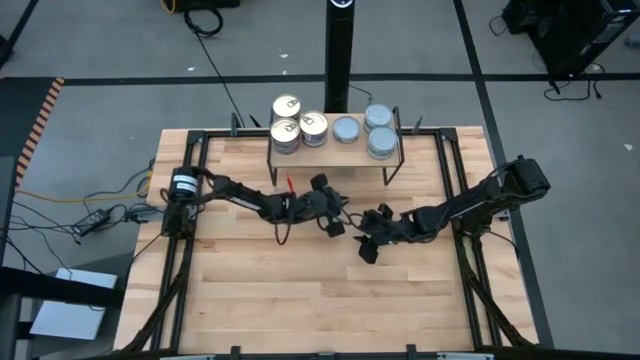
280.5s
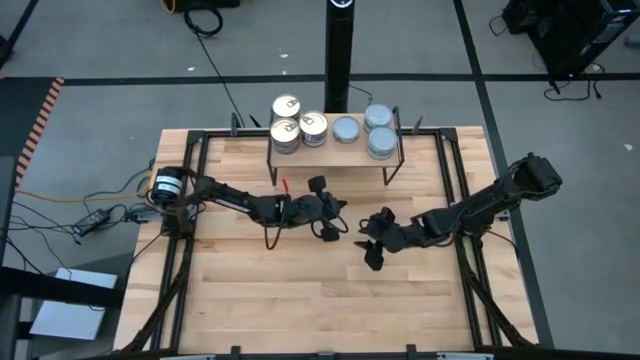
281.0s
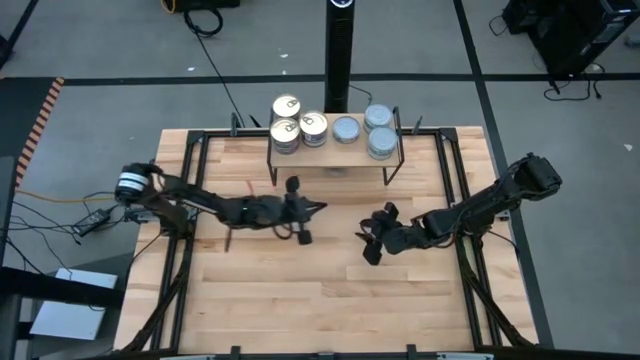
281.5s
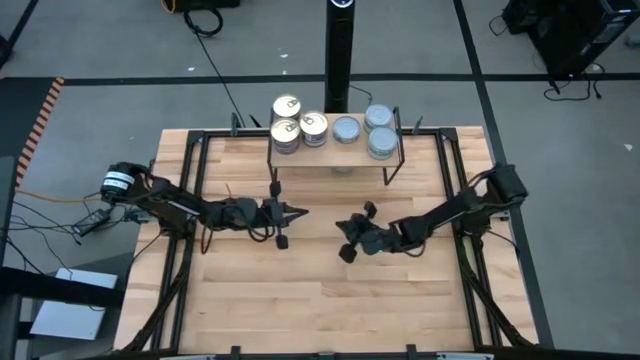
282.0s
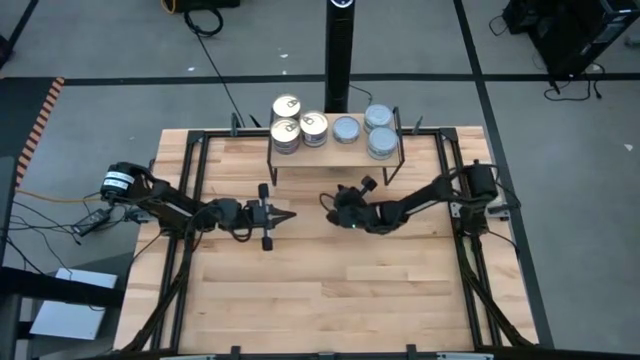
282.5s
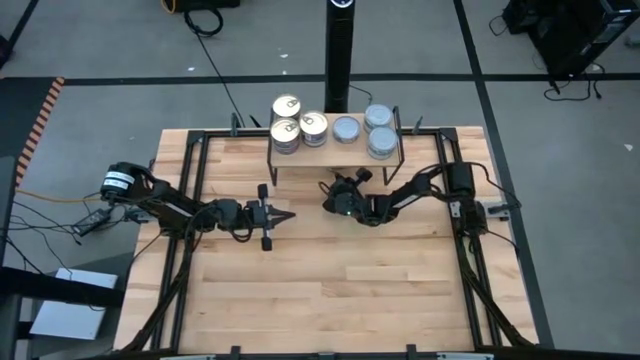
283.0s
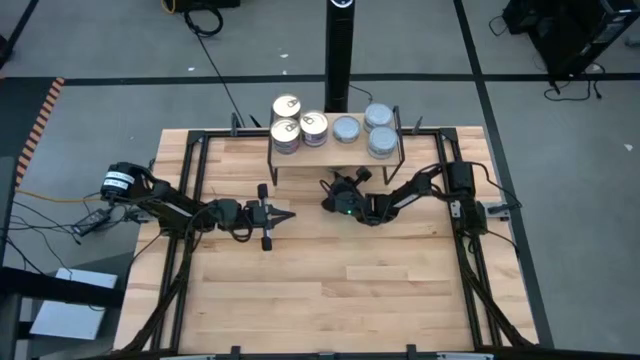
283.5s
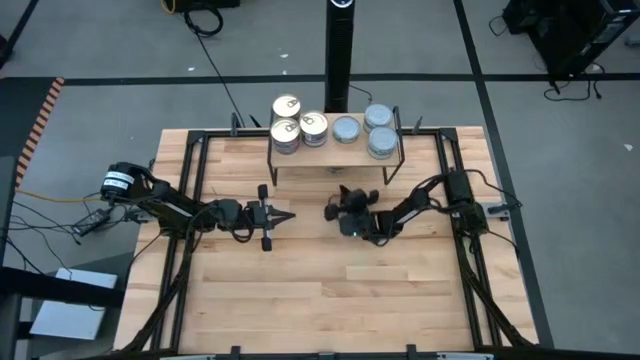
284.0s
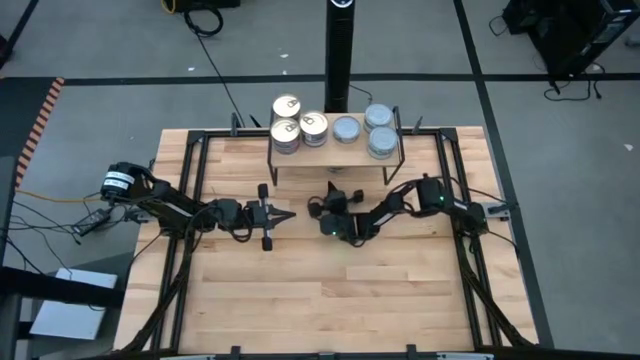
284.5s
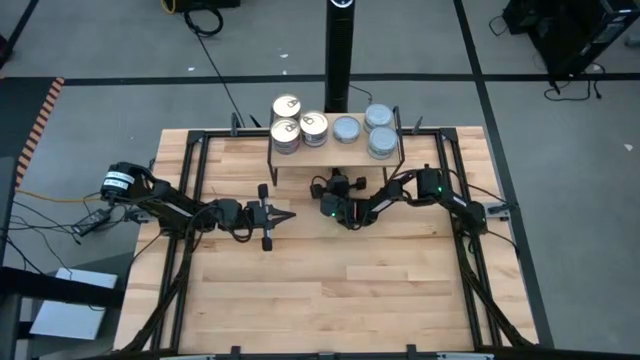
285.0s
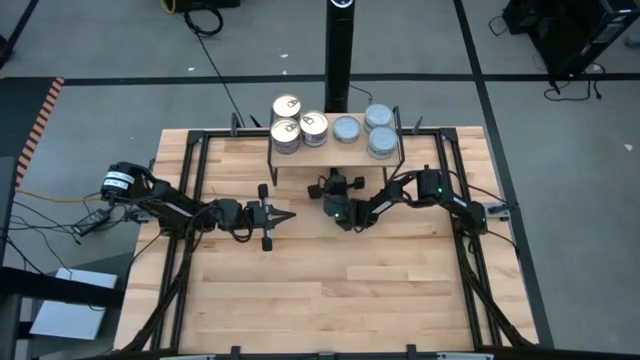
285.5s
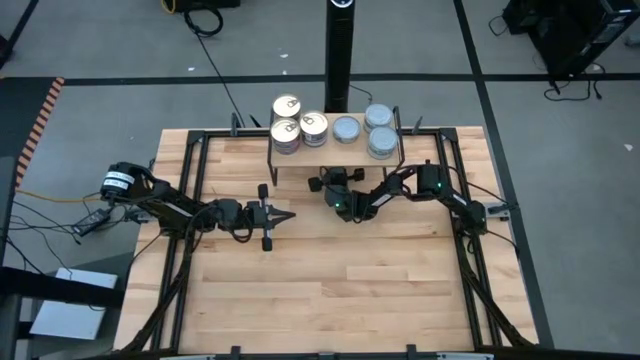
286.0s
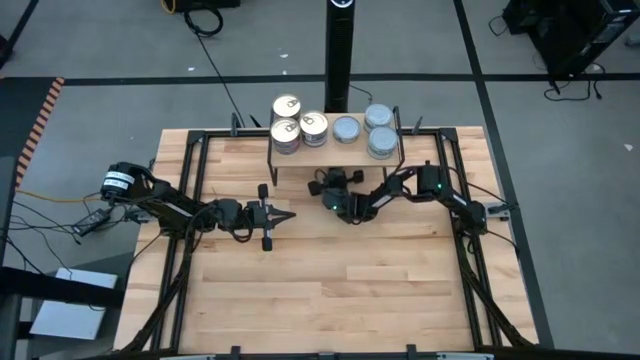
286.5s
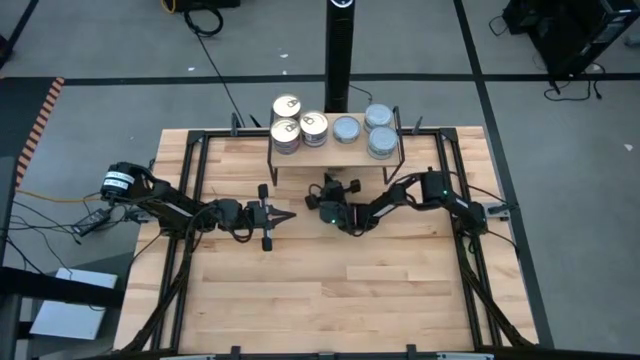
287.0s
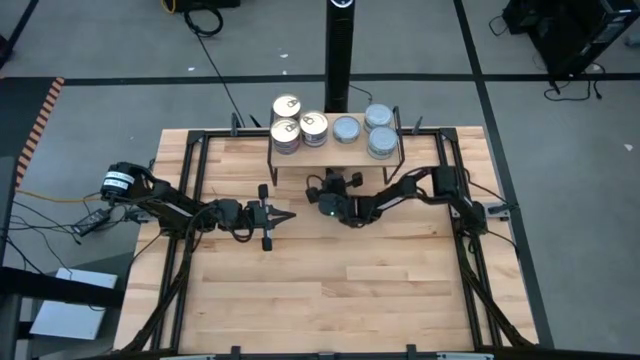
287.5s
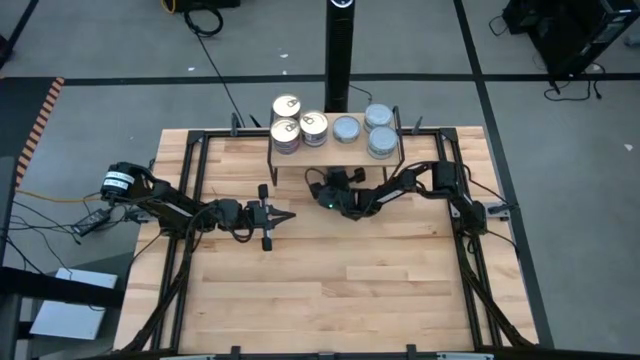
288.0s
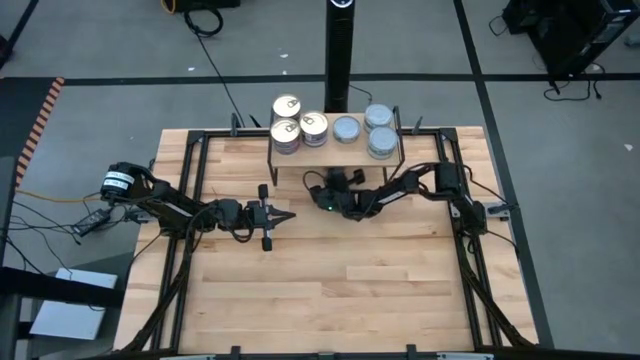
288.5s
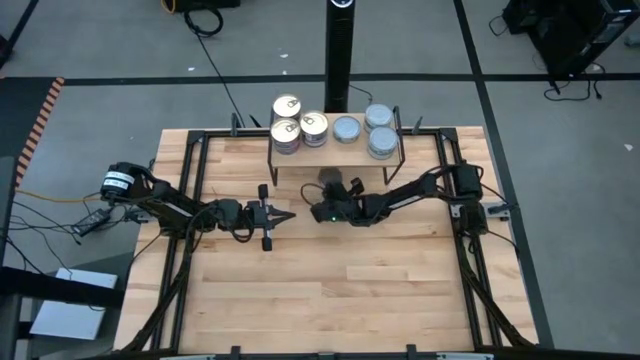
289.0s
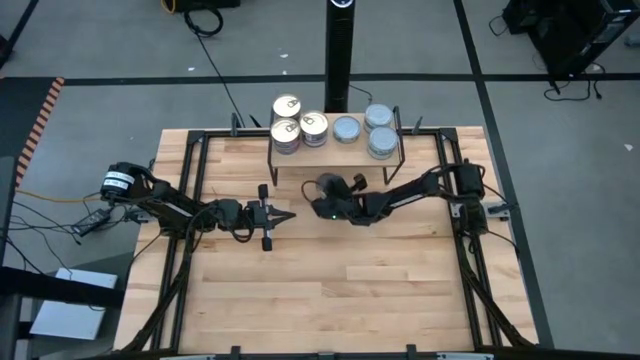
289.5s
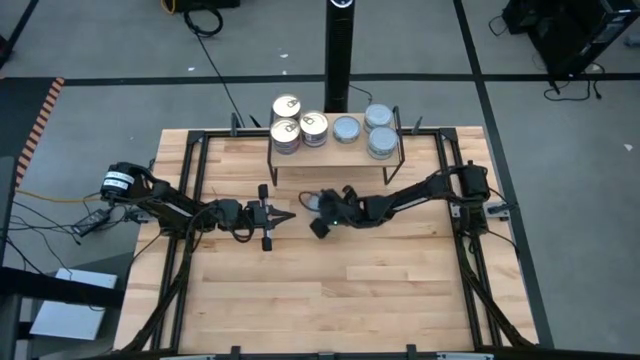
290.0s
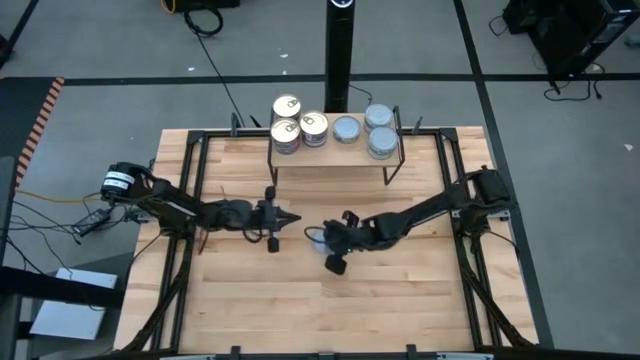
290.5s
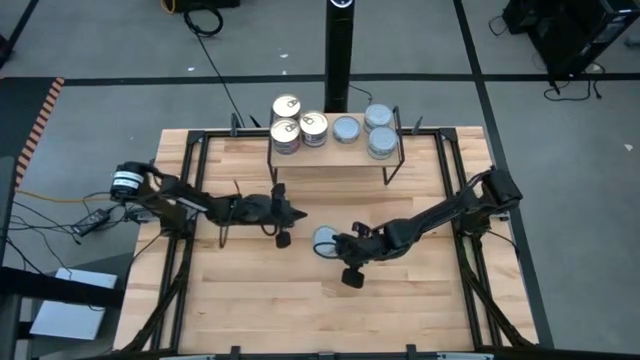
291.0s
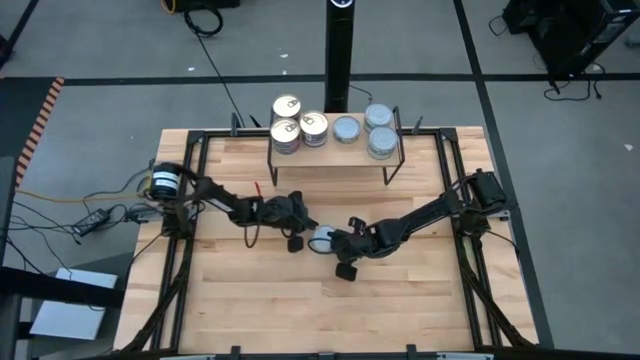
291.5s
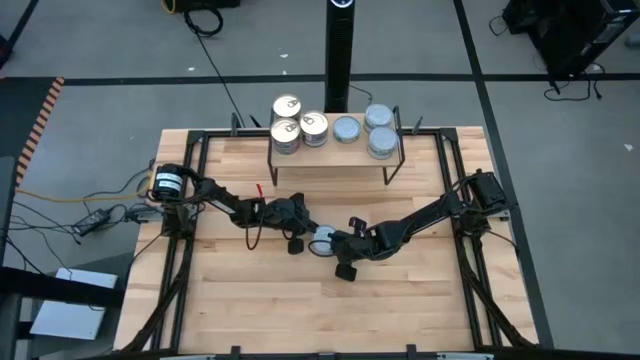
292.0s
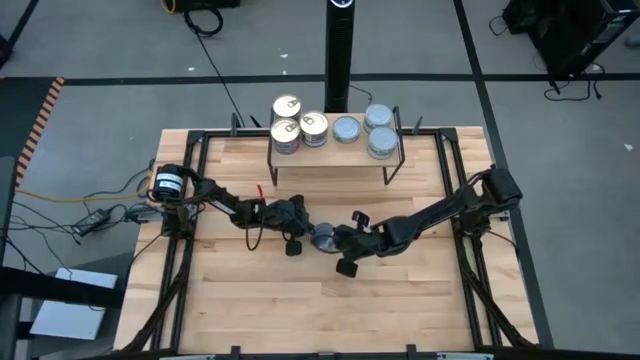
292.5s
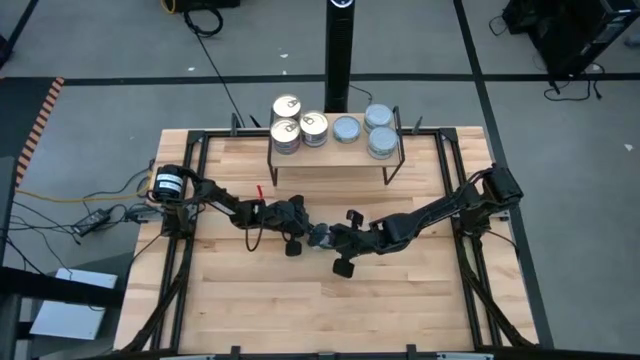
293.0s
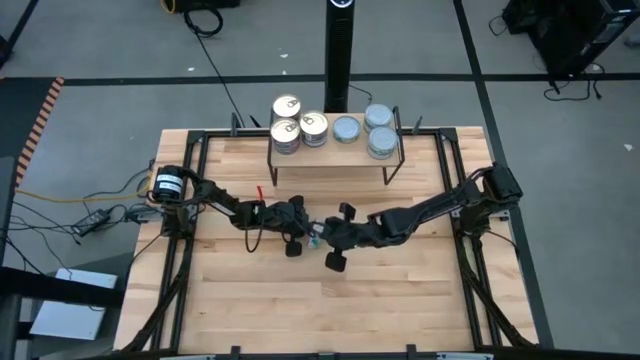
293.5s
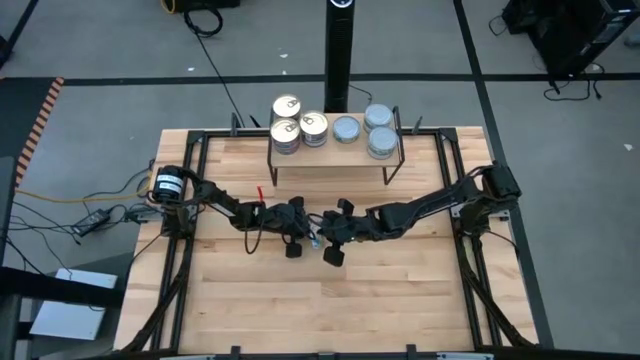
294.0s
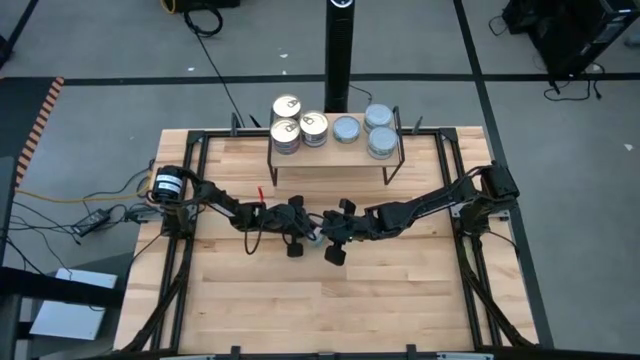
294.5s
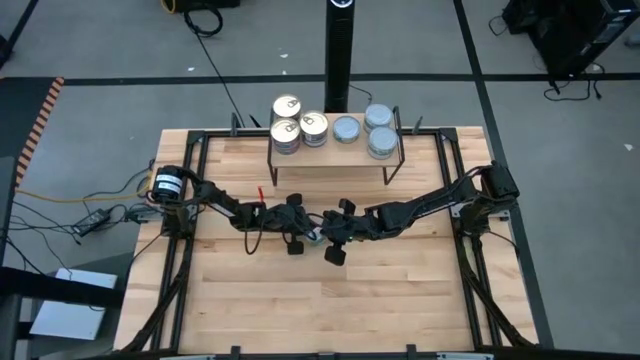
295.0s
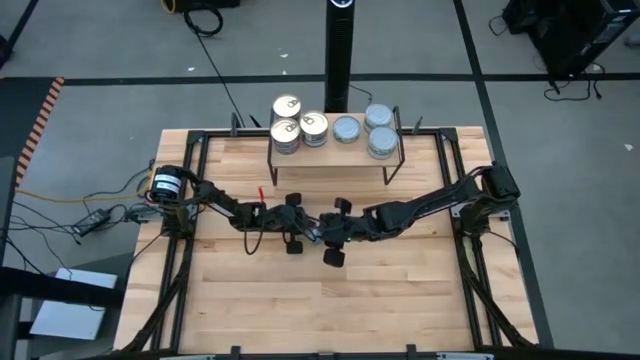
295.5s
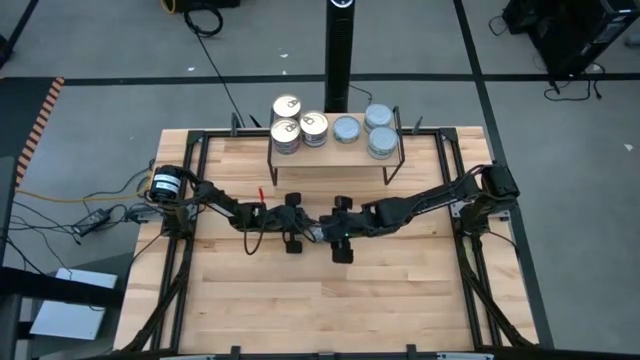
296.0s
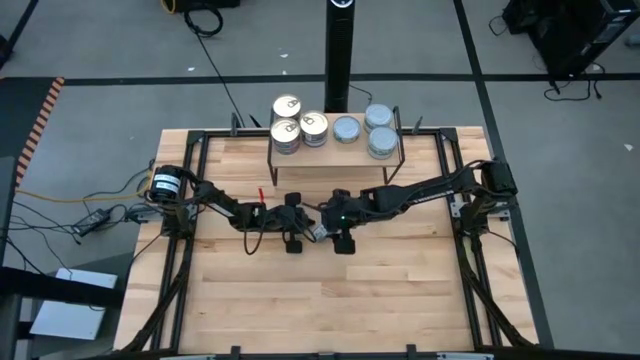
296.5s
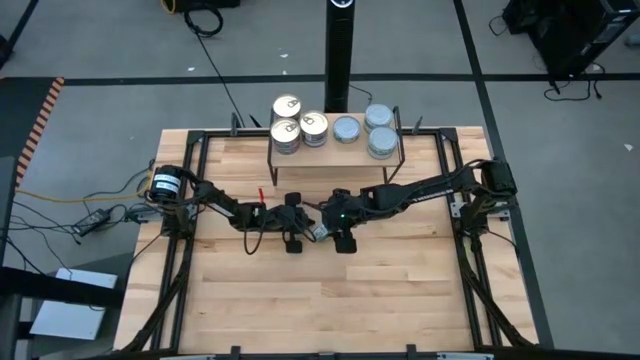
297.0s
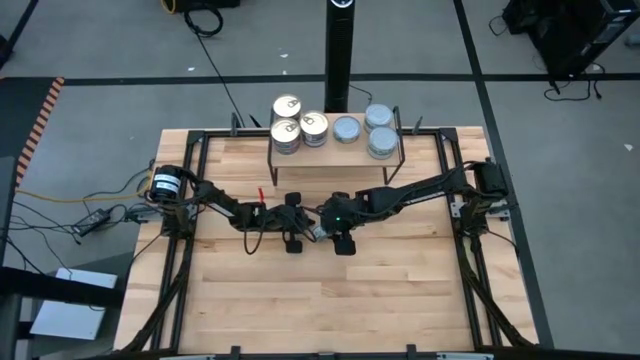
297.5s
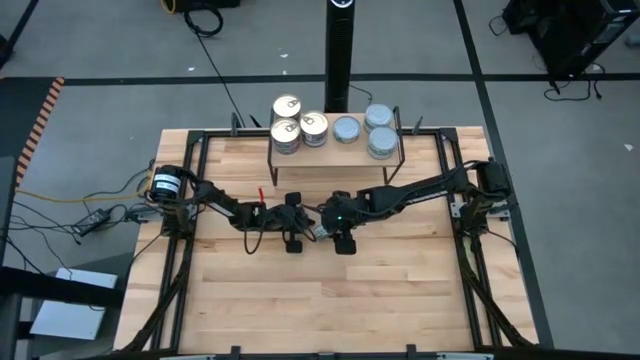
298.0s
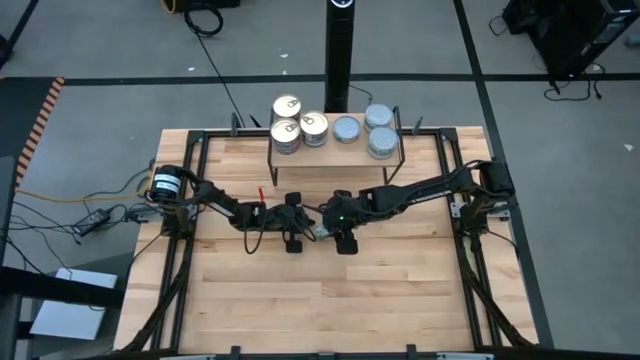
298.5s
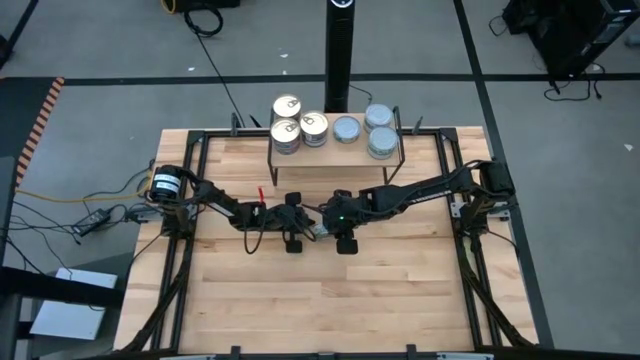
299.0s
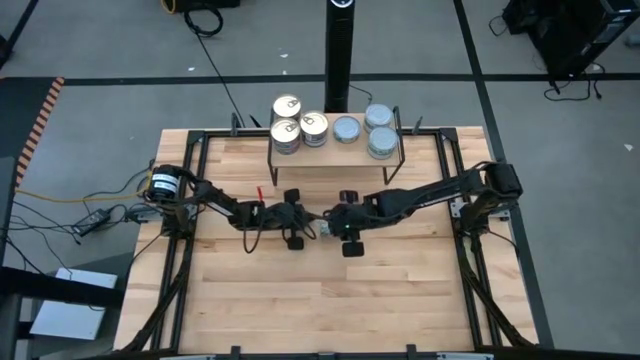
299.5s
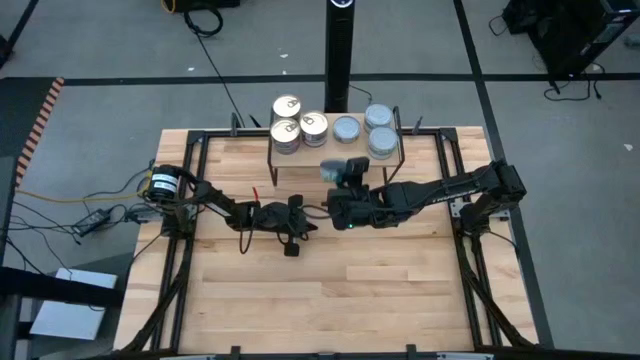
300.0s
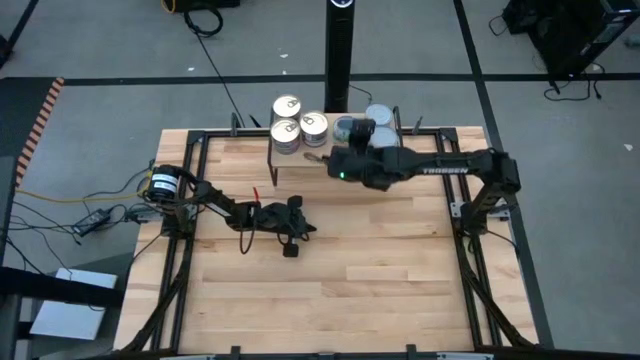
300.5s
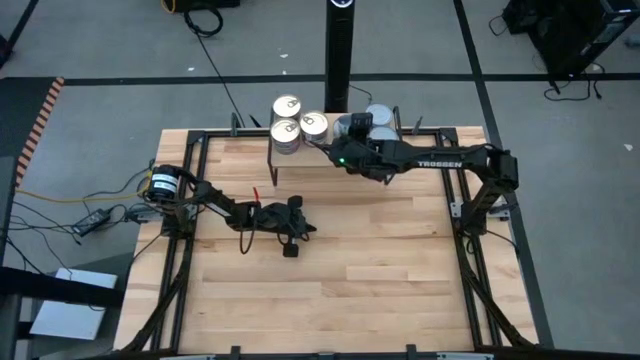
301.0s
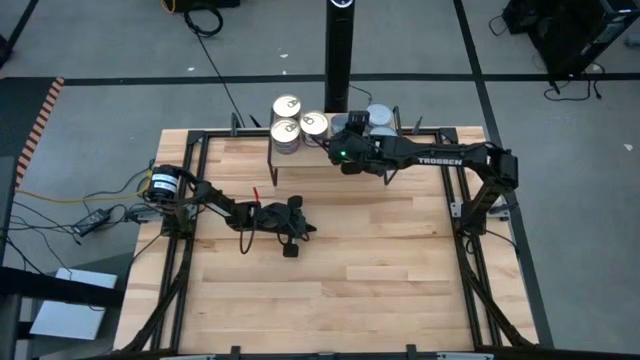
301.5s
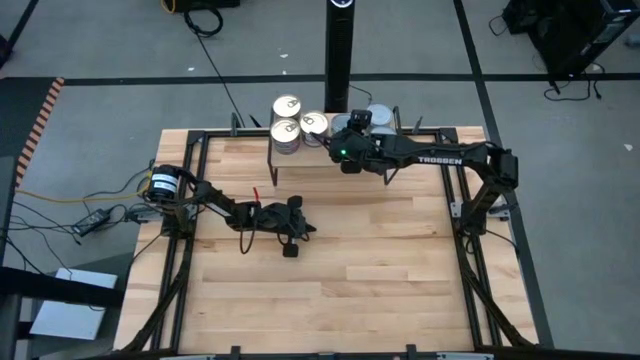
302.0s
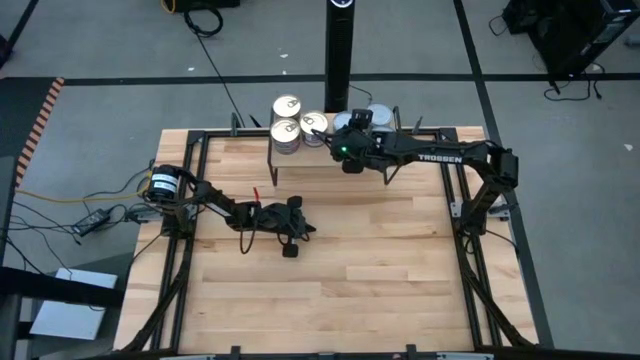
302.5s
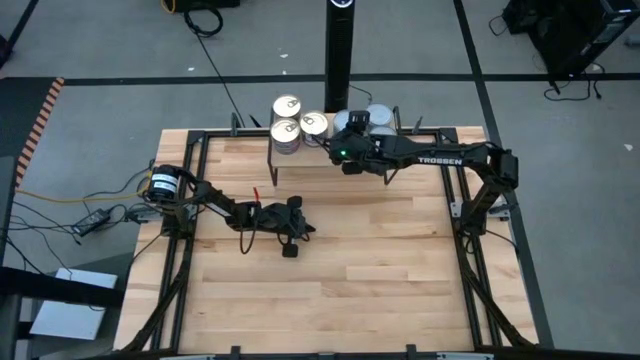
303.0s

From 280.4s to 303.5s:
Task: Stack canned seafood by type on shelf
Stack the green tuna can on the left green tuna can on the shelf
